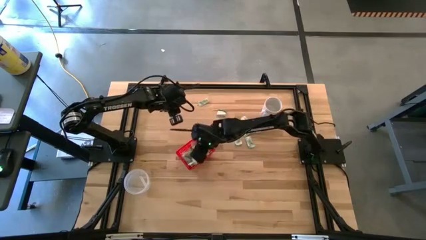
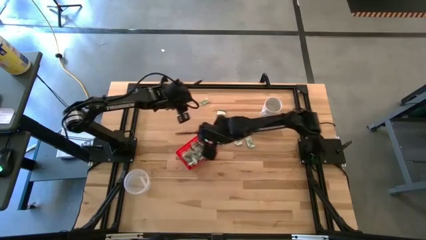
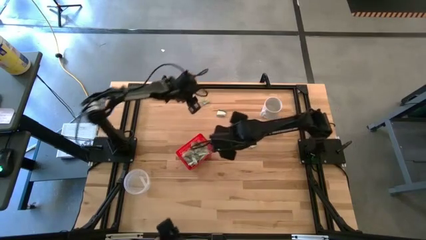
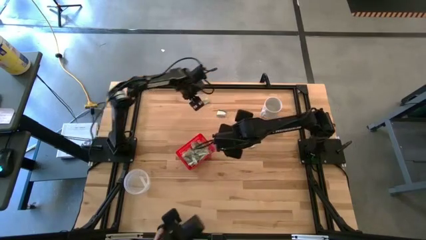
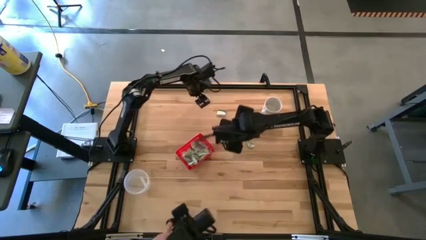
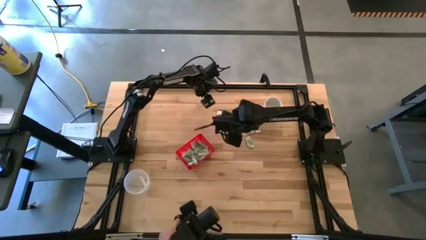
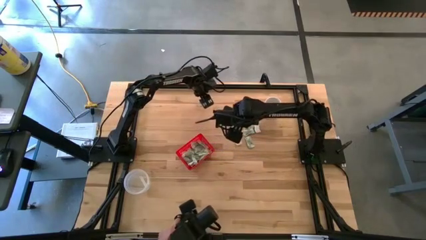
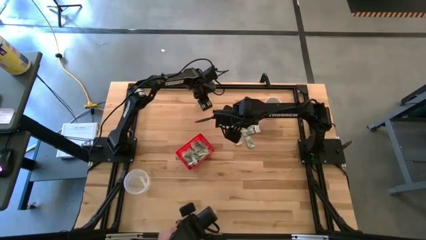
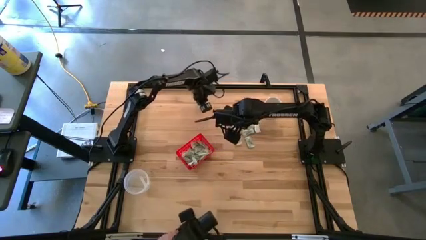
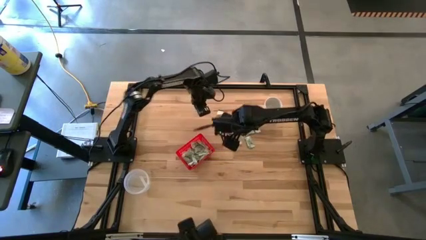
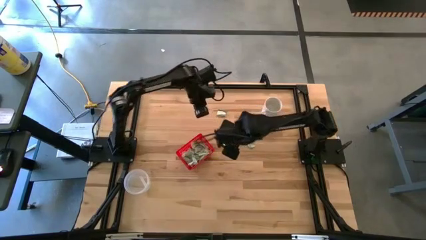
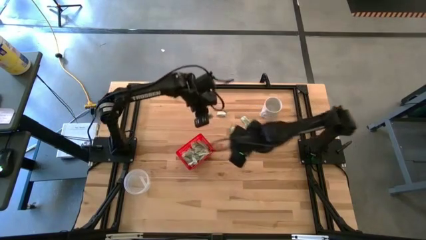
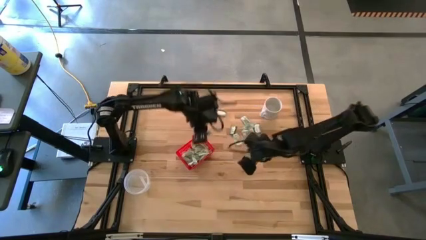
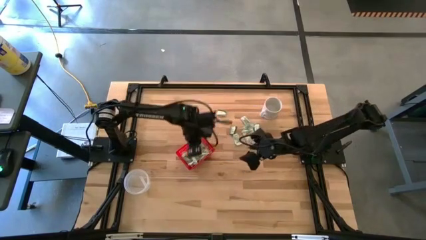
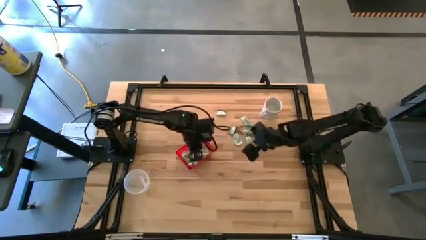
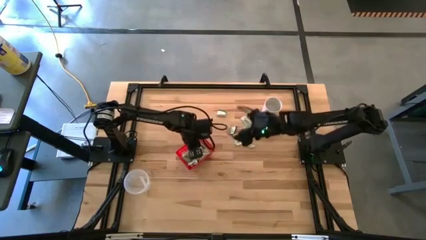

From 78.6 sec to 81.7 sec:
Task: Pick and place Stevia / Truvia into bins
Put the green stevia packet into the red basket

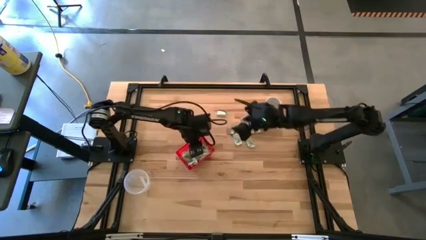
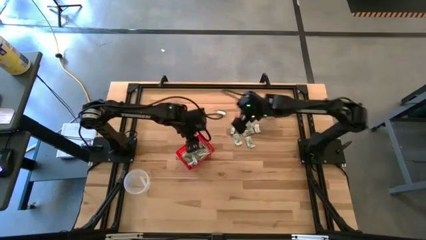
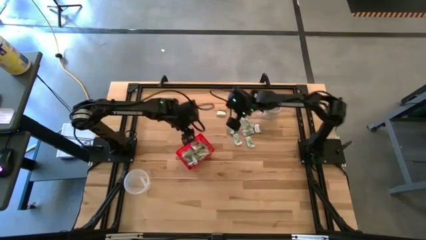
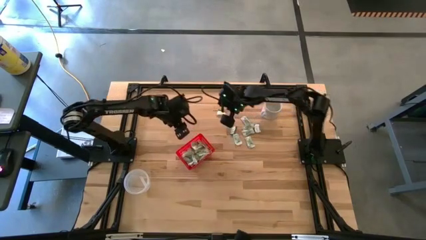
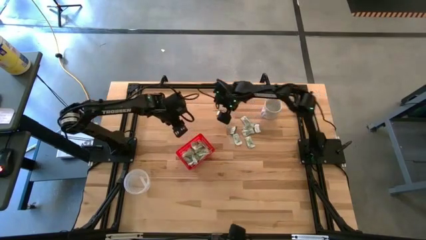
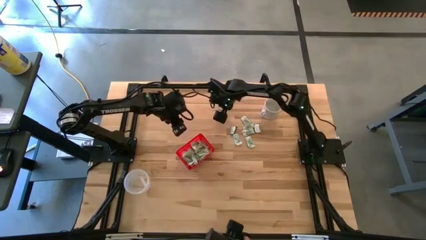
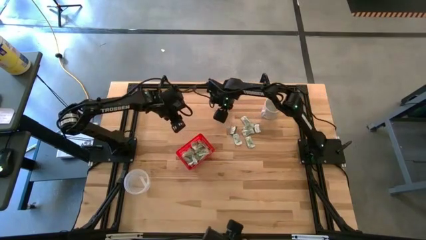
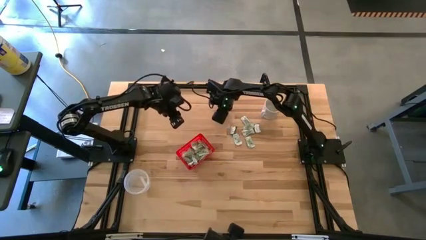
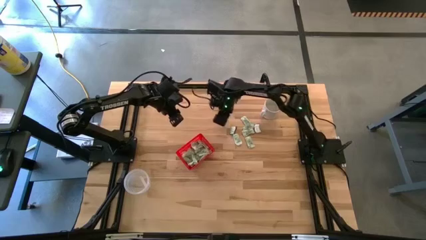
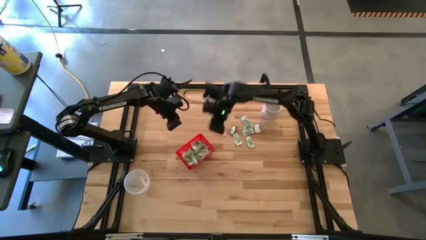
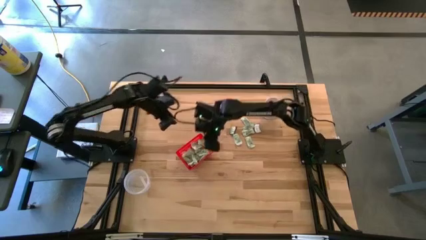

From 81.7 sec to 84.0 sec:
Put the dark green truvia packet into the red basket

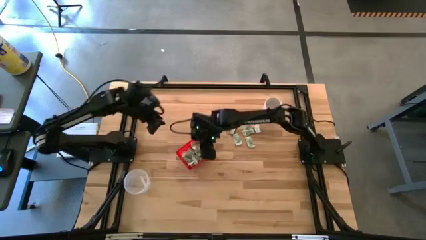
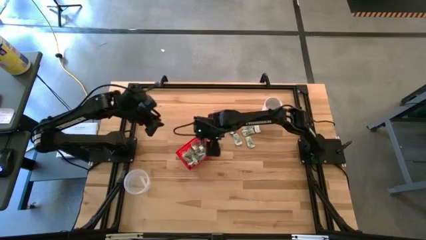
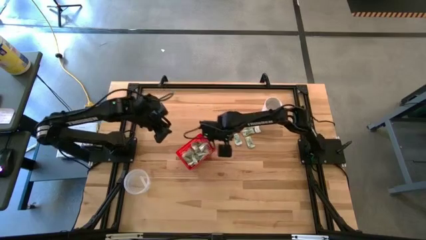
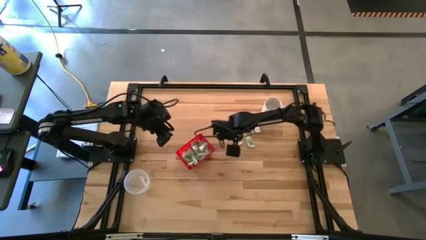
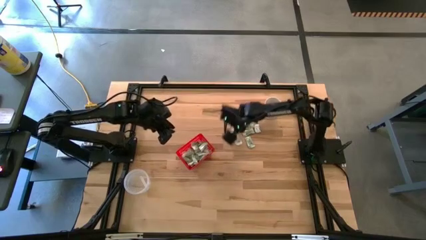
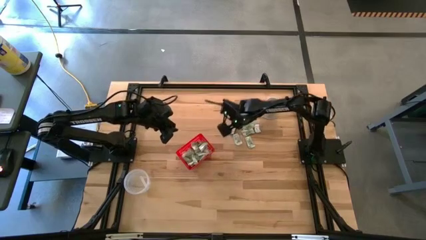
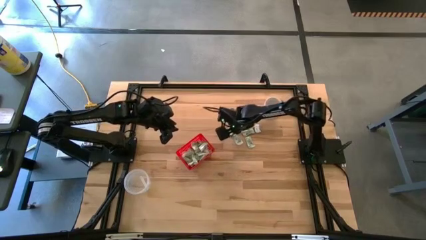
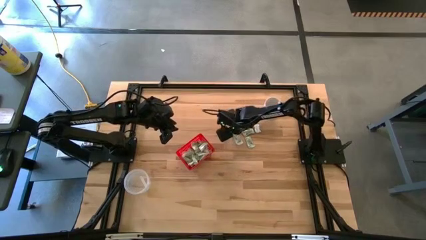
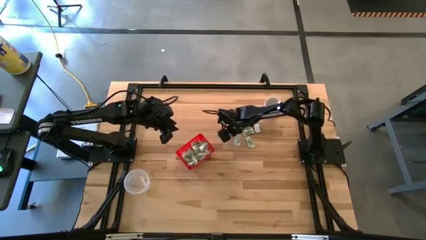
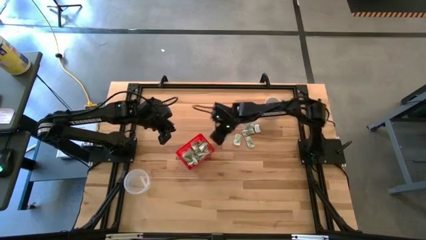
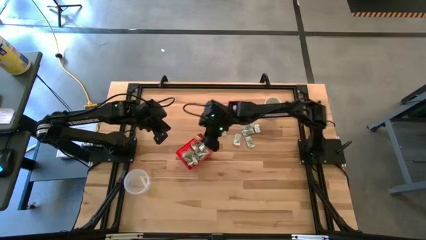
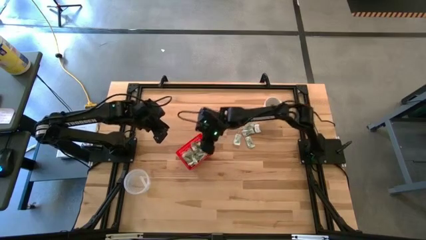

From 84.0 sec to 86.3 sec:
Put the dark green truvia packet into the red basket

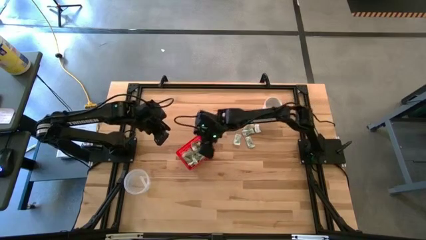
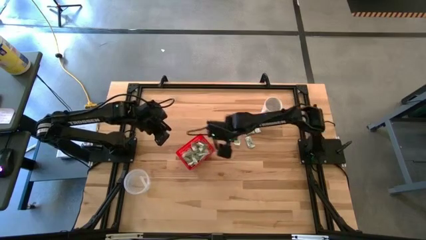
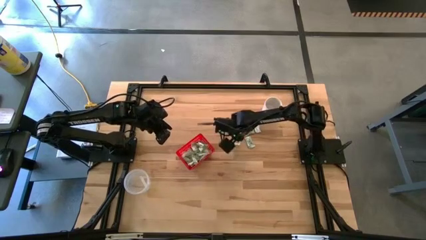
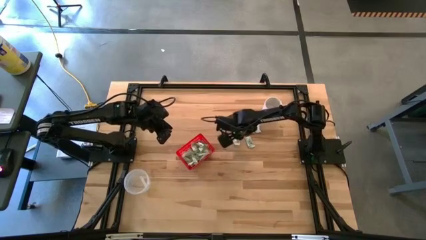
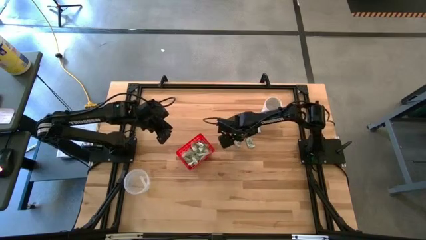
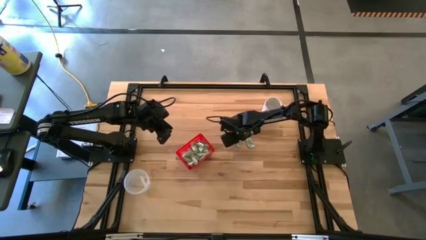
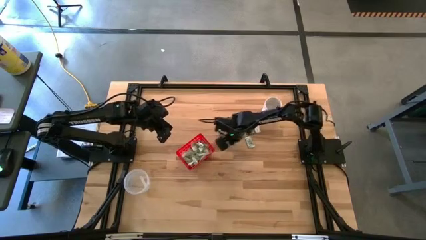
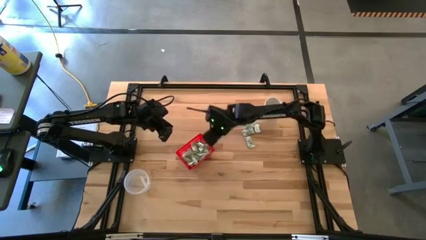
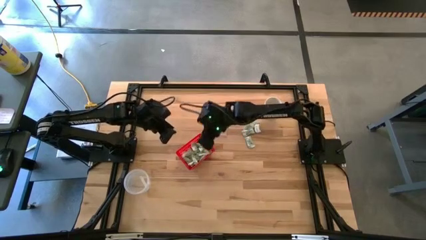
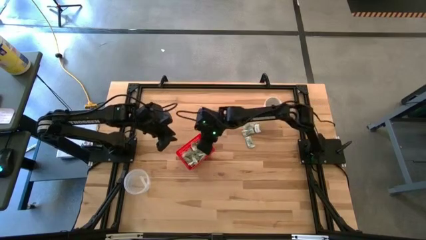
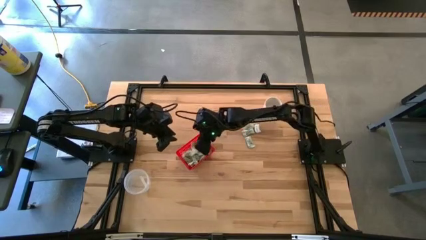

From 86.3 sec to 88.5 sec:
Put the green stevia packet into the red basket

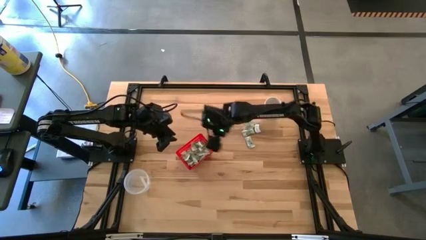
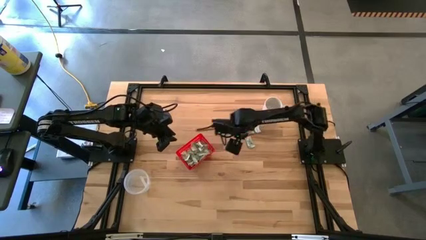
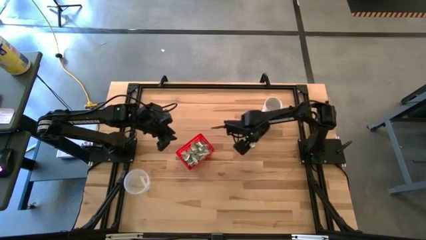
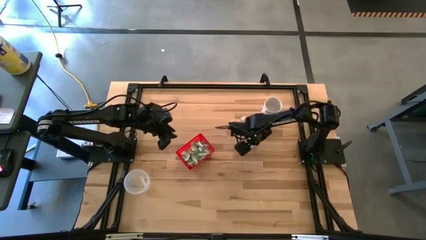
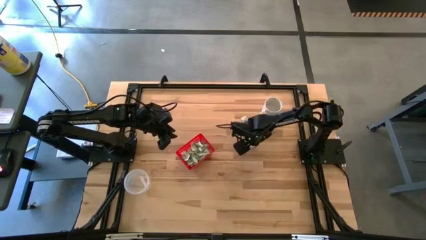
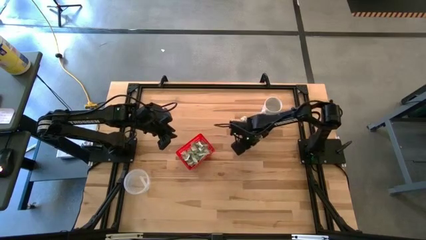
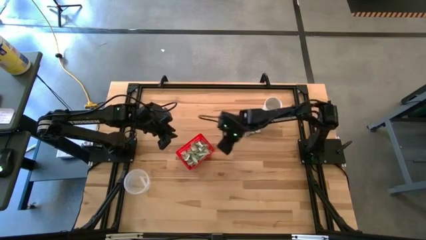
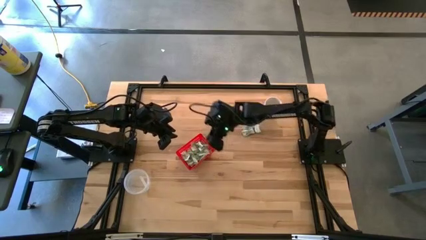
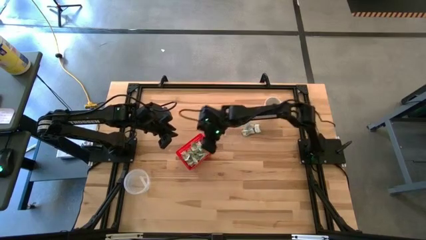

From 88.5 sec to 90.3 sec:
Put the green stevia packet into the red basket

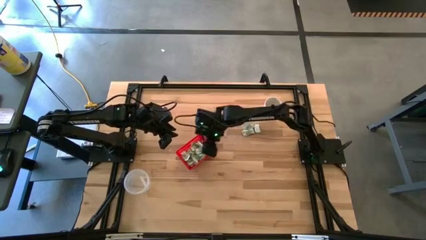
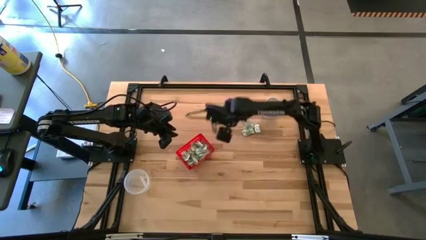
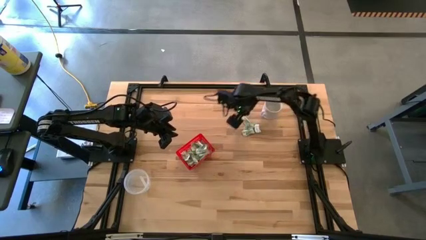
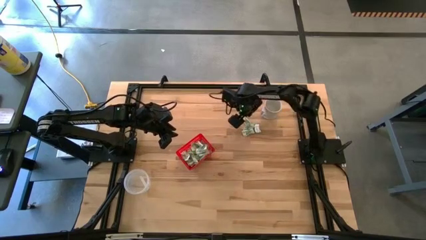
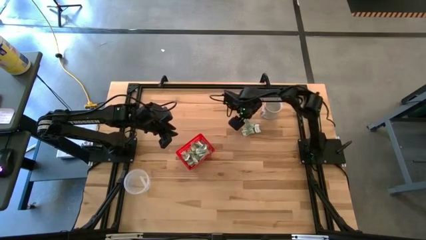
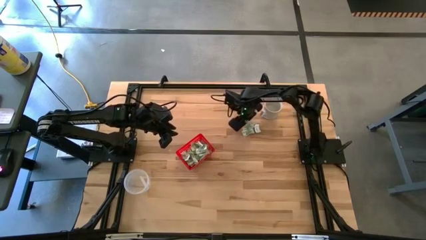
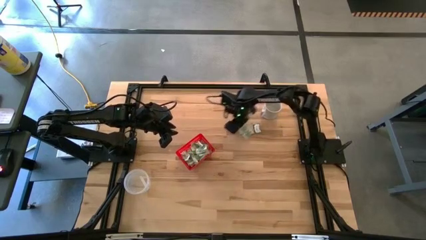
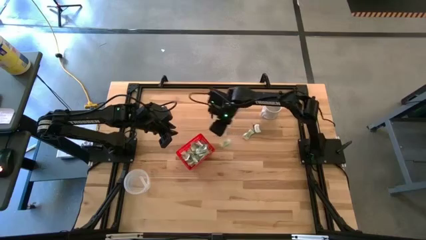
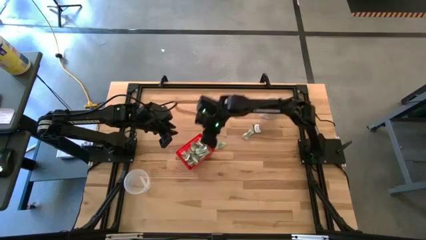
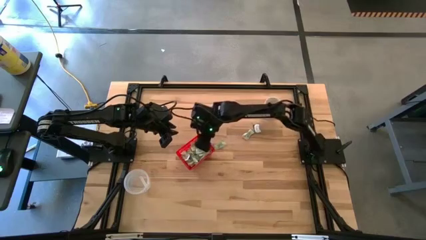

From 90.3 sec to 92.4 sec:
Put the green stevia packet into the red basket

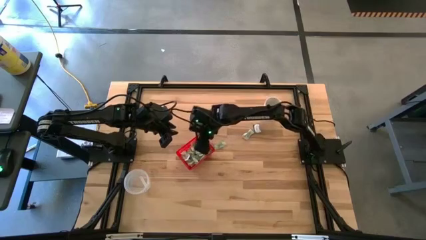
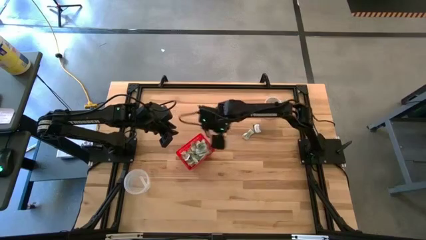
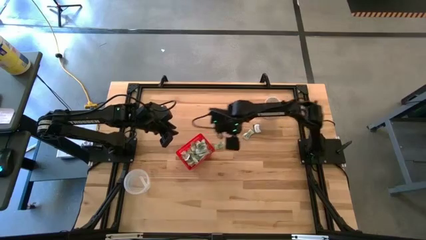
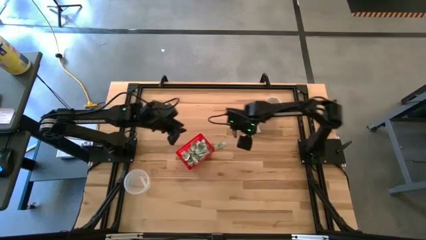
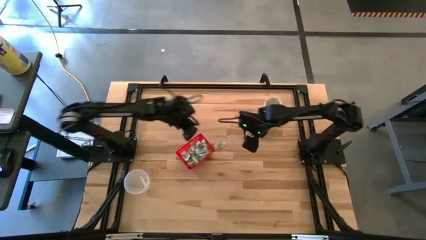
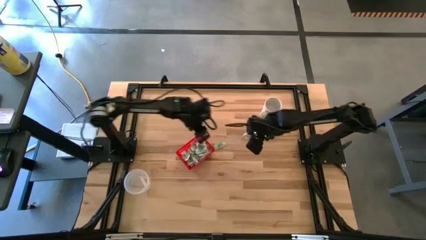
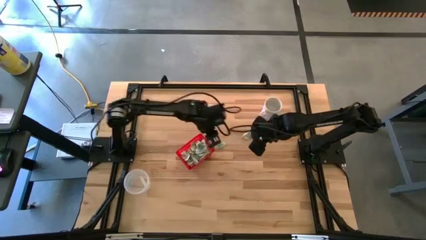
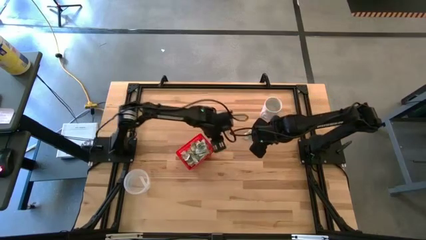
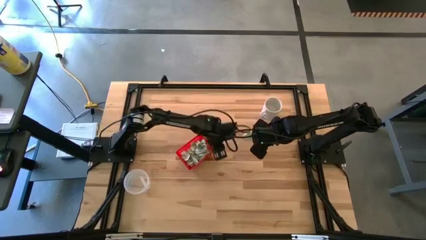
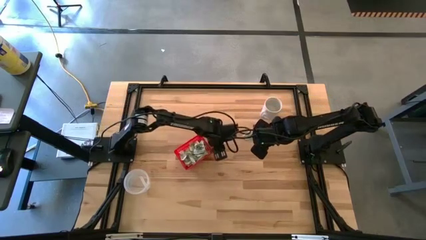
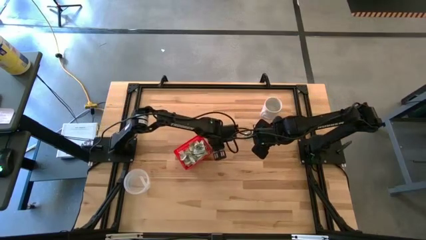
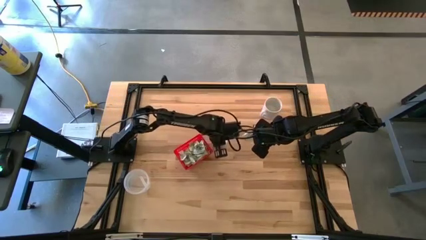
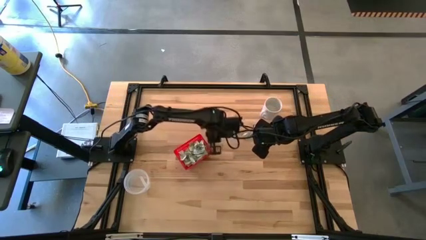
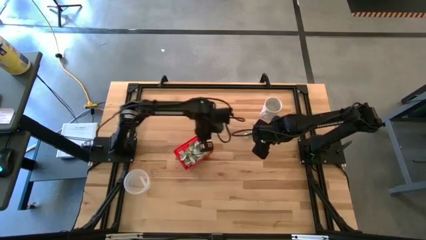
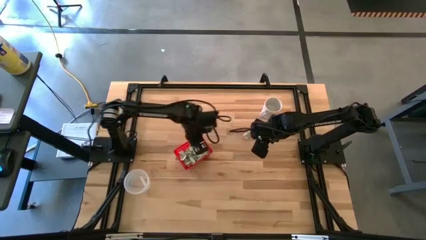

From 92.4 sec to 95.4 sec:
Put the green stevia packet into the red basket

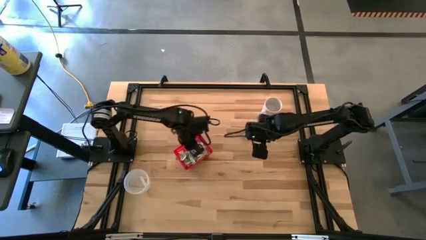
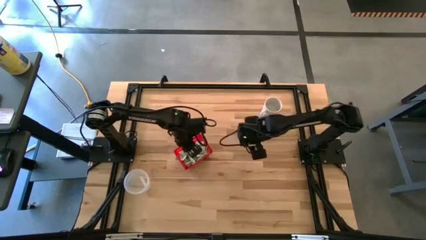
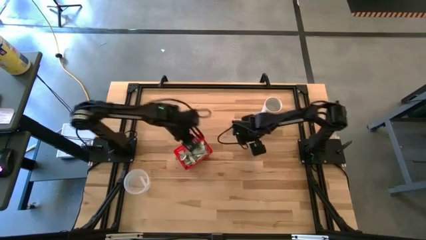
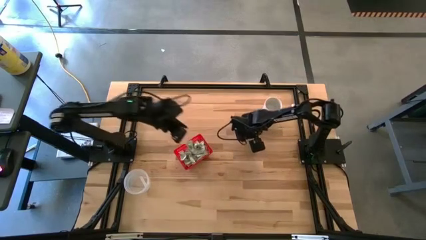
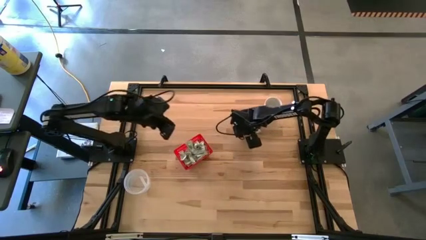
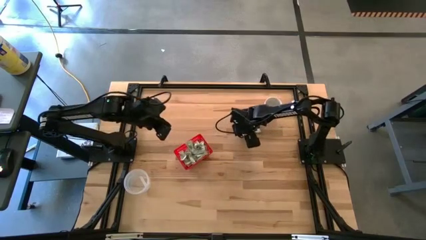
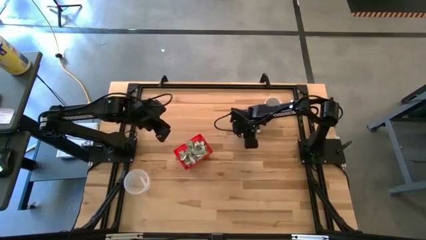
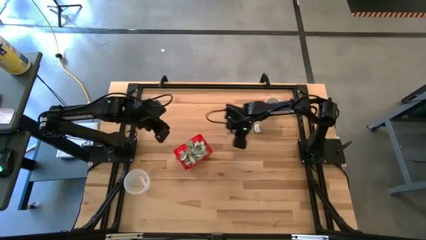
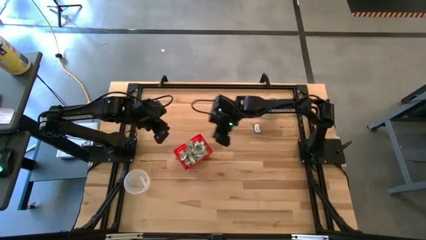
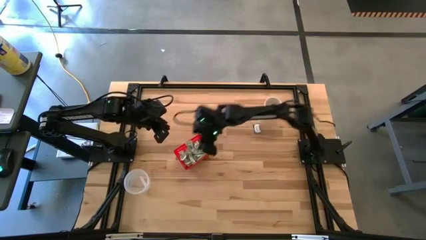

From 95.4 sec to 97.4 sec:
Put the green stevia packet into the red basket
